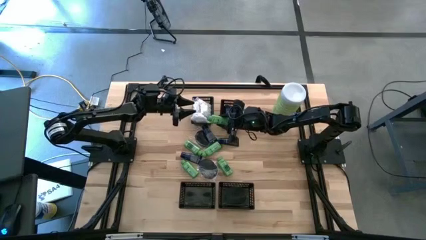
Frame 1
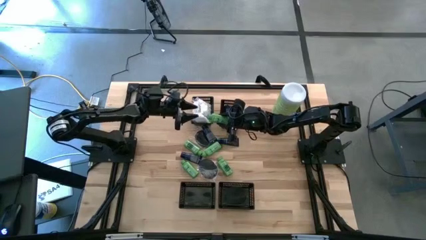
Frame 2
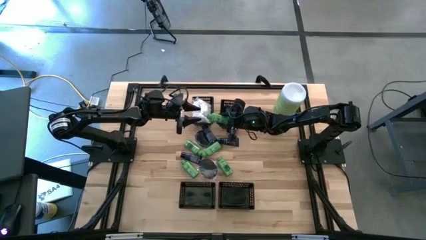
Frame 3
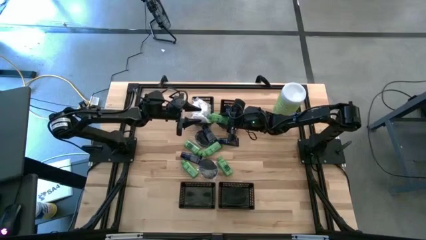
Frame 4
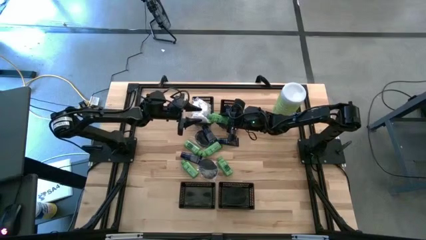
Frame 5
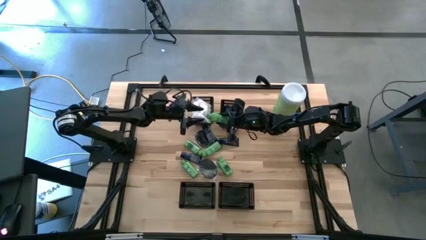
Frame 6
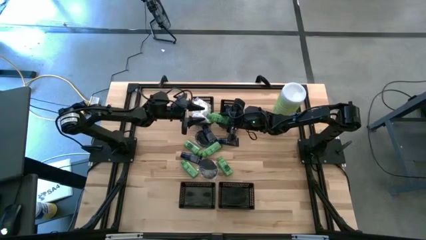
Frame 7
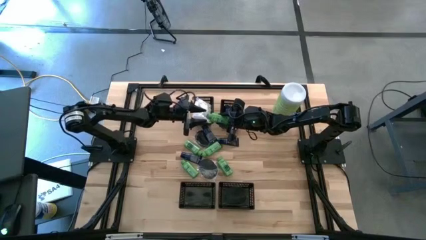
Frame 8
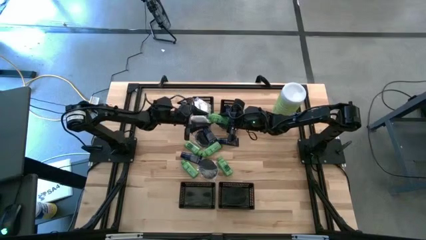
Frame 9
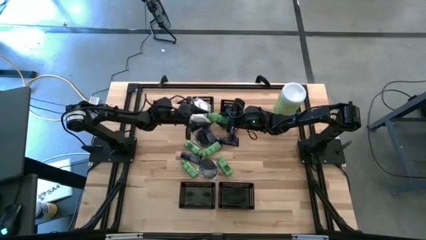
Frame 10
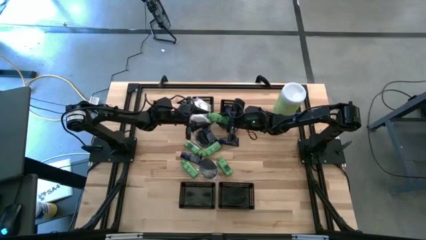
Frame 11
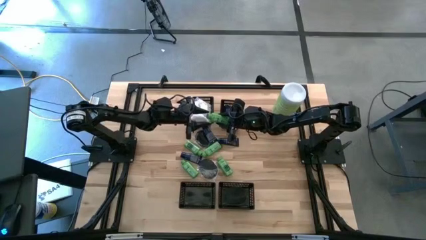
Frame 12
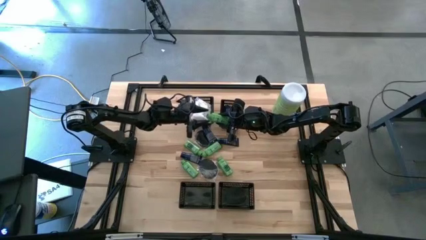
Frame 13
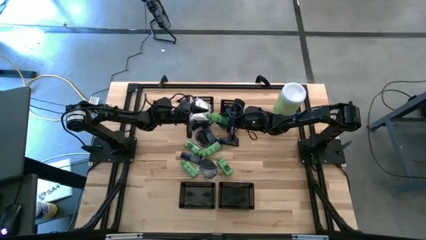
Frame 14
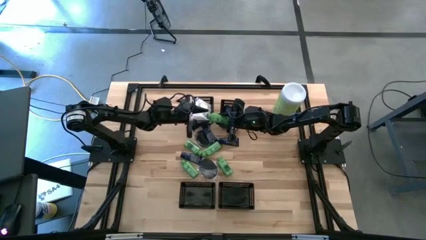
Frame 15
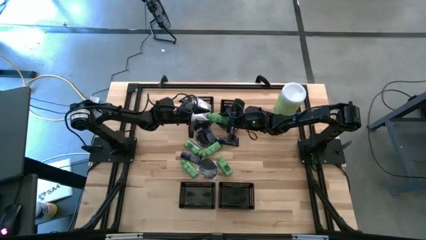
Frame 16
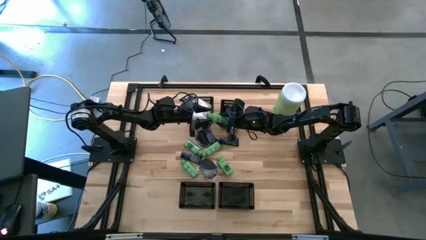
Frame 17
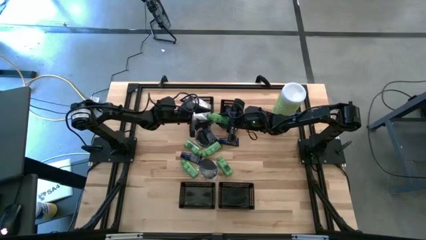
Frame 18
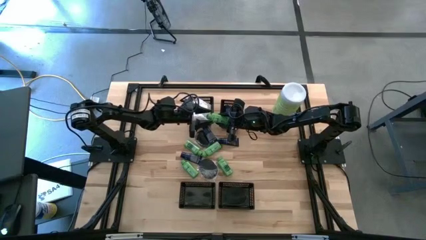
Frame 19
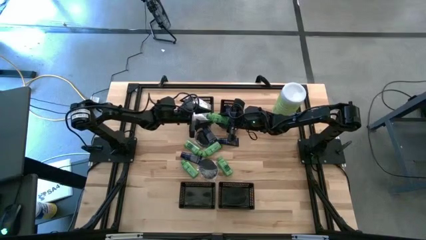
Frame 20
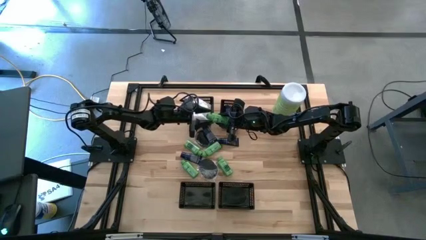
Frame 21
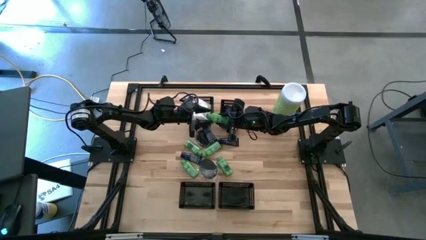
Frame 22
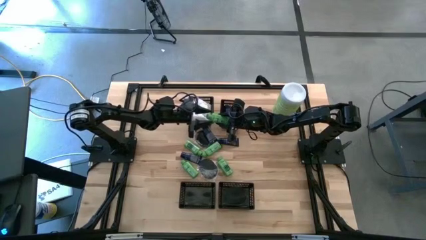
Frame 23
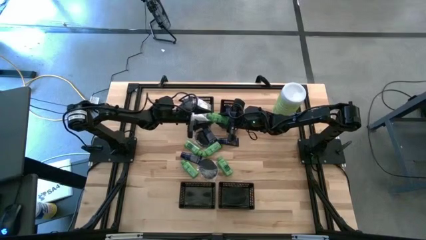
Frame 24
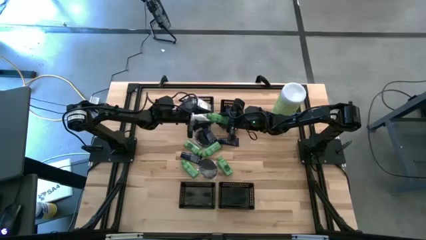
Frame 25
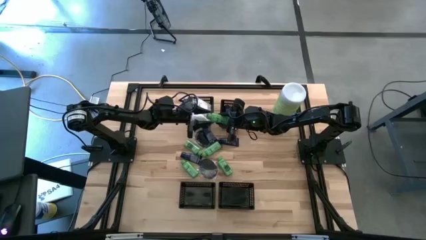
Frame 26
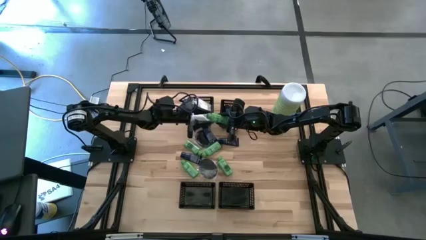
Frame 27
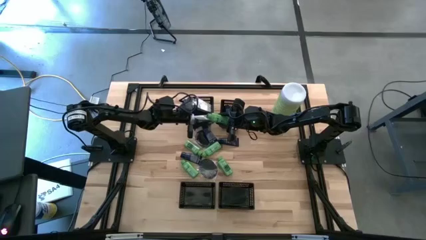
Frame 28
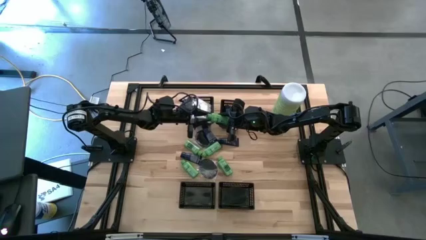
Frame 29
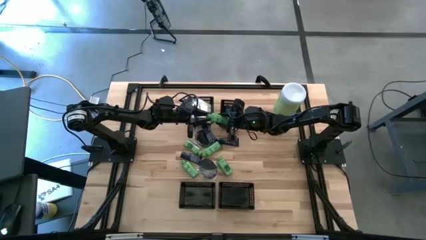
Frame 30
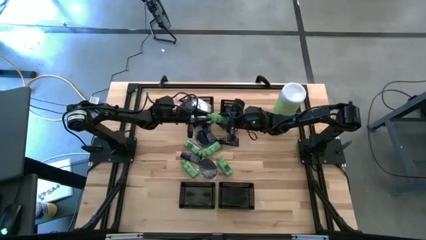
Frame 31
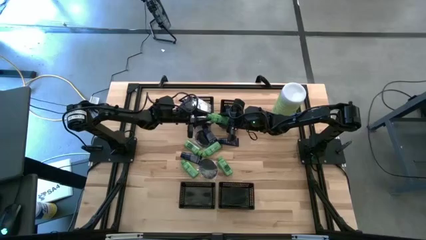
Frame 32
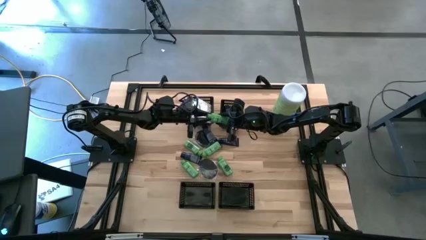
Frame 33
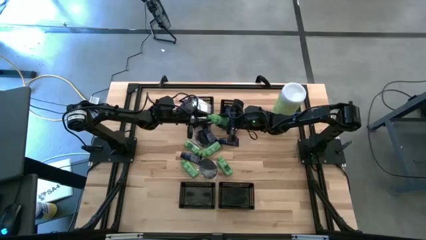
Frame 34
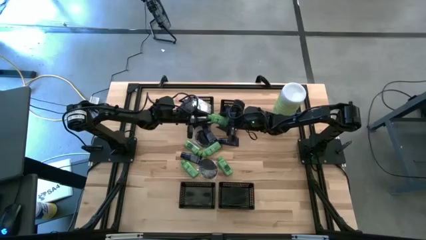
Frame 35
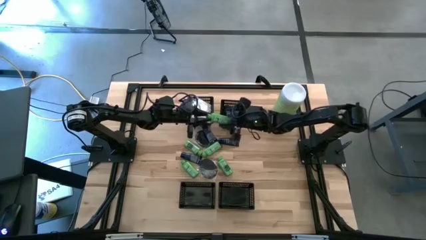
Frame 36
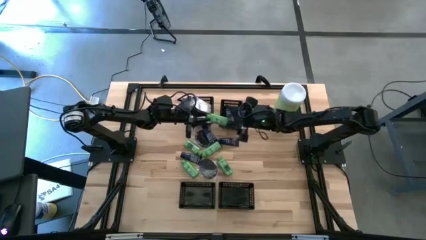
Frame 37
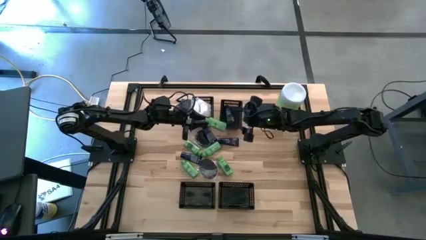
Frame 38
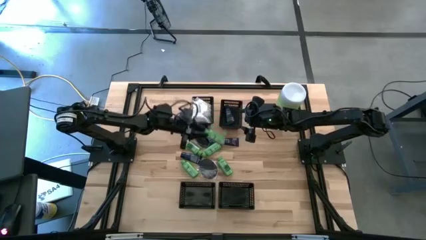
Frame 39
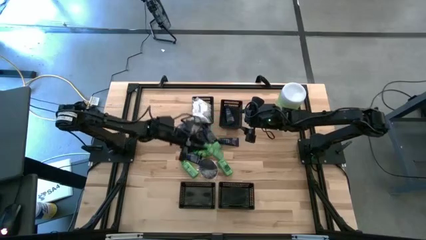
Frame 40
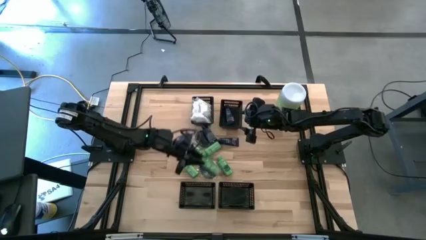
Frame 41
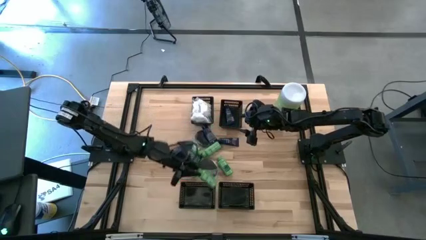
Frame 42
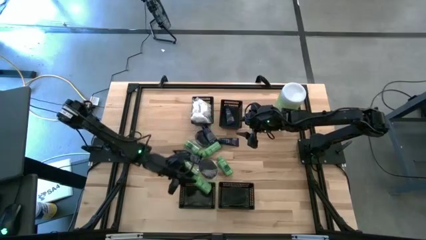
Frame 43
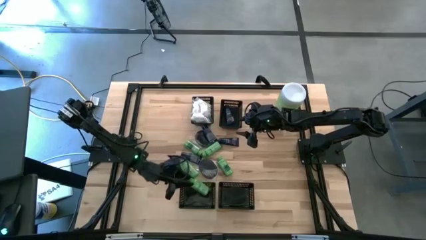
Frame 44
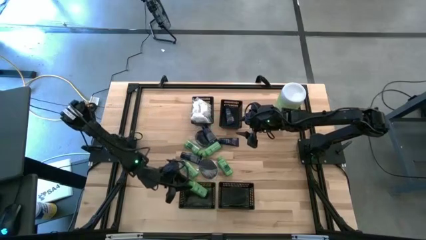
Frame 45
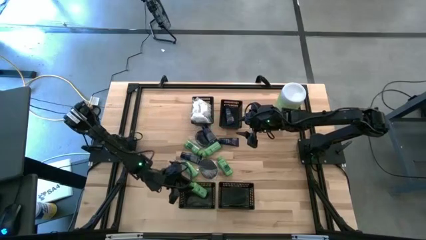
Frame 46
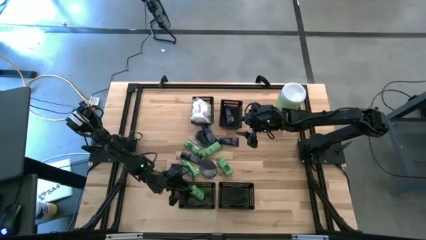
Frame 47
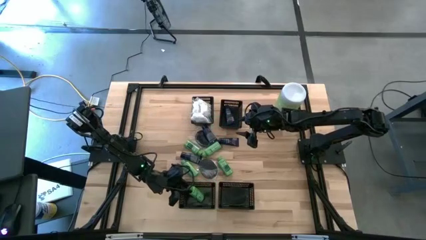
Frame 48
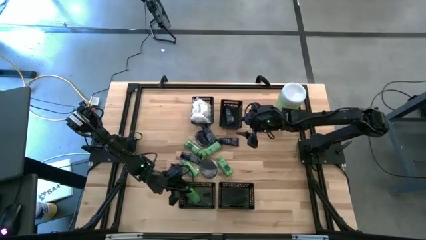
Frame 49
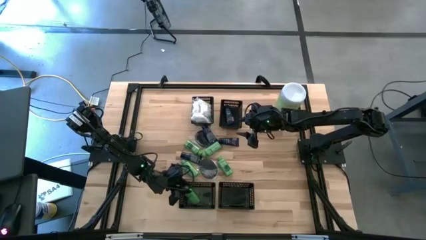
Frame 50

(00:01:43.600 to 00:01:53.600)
Task: Pick & Place Travel size toiletries
Put the green shampoo into the bottom left black bin

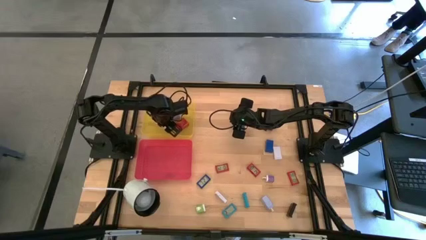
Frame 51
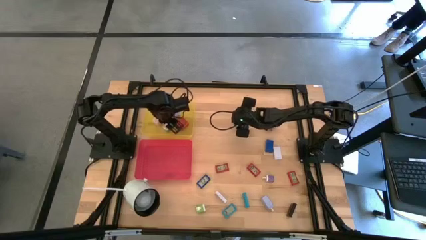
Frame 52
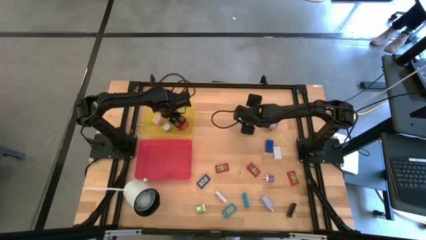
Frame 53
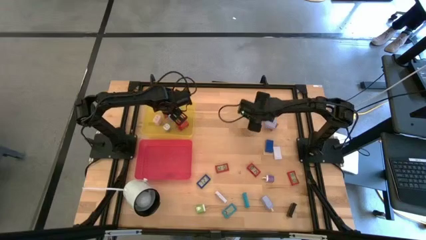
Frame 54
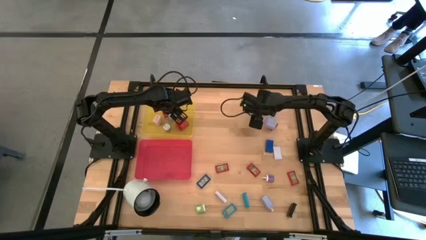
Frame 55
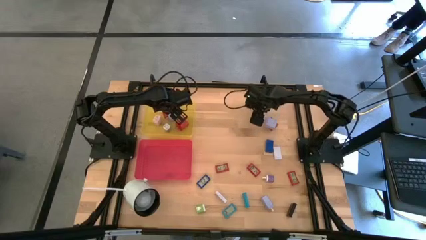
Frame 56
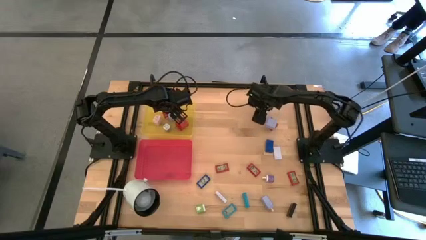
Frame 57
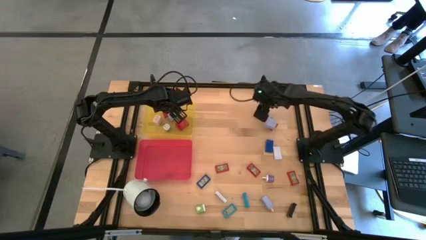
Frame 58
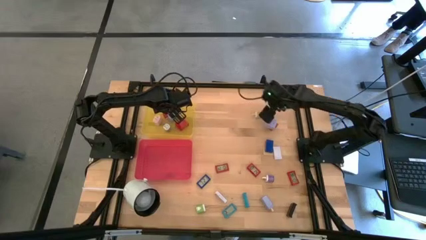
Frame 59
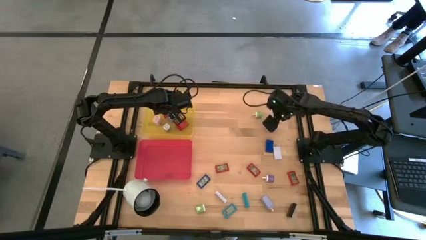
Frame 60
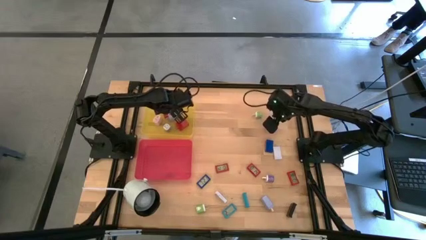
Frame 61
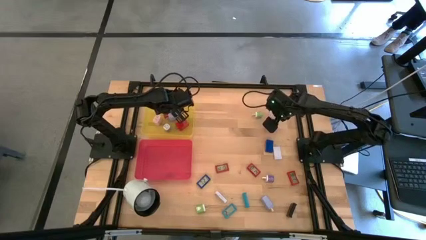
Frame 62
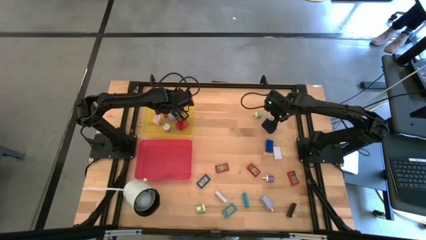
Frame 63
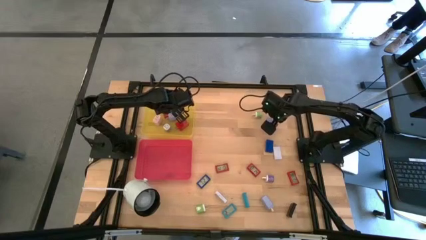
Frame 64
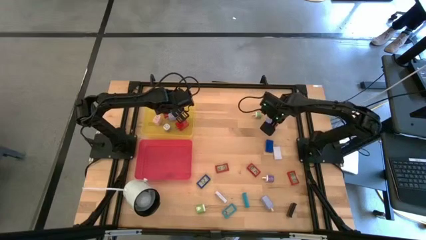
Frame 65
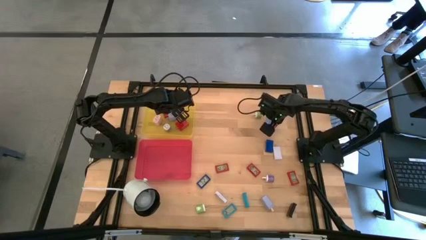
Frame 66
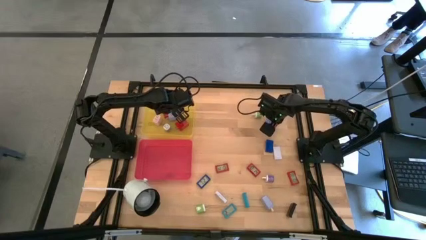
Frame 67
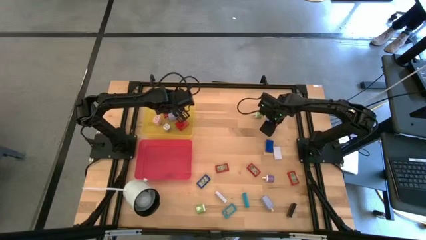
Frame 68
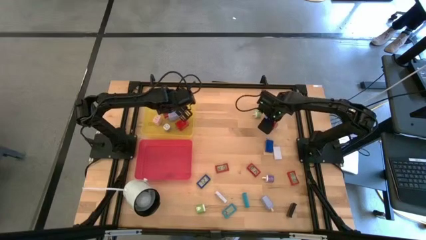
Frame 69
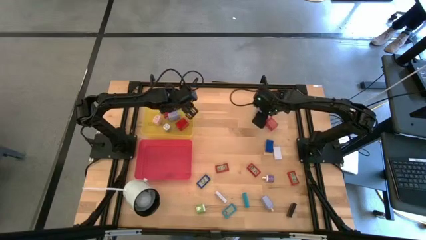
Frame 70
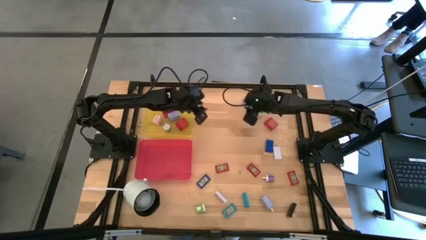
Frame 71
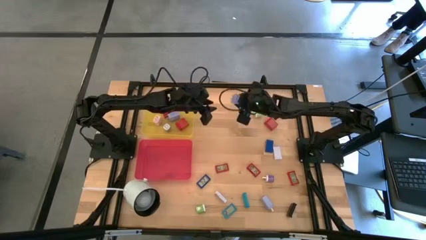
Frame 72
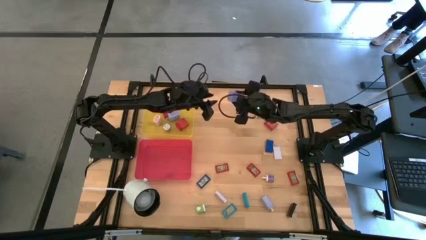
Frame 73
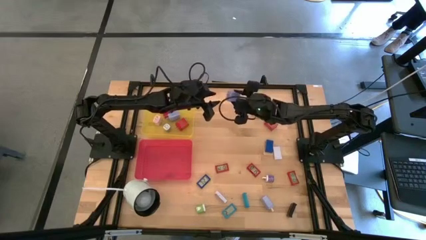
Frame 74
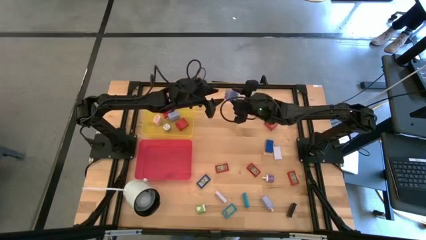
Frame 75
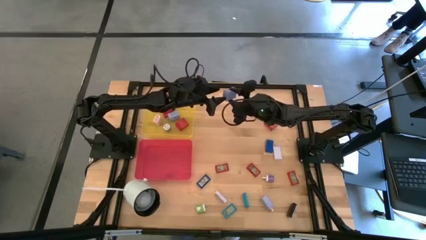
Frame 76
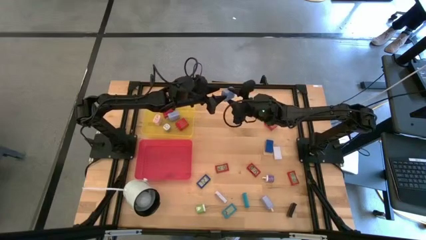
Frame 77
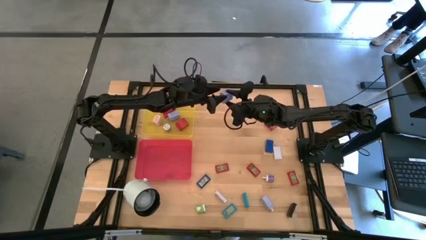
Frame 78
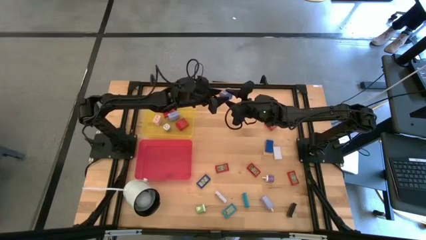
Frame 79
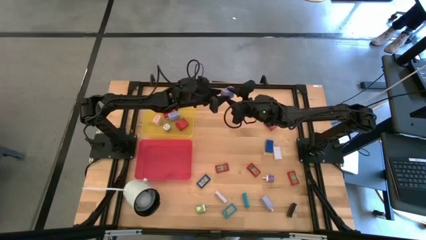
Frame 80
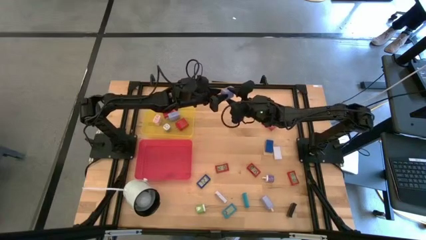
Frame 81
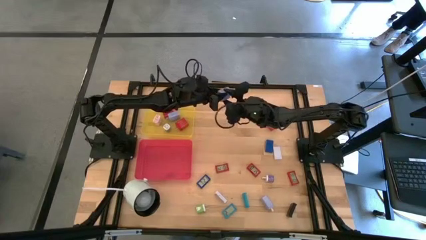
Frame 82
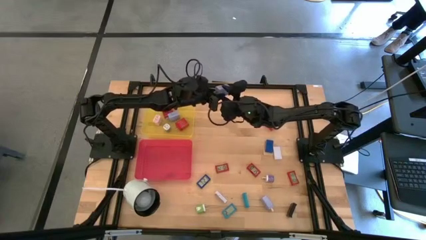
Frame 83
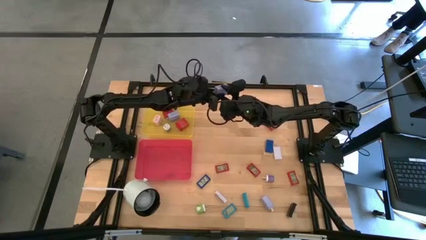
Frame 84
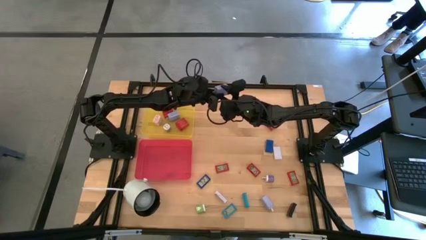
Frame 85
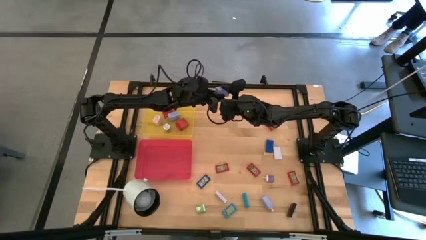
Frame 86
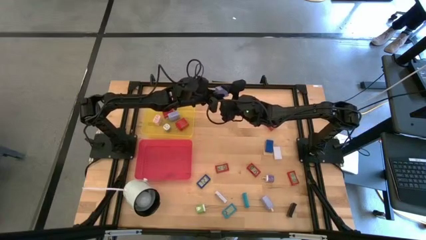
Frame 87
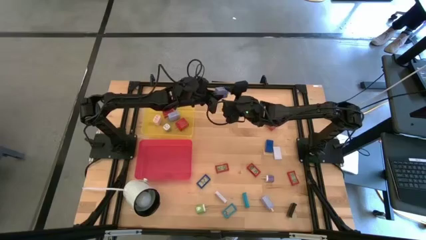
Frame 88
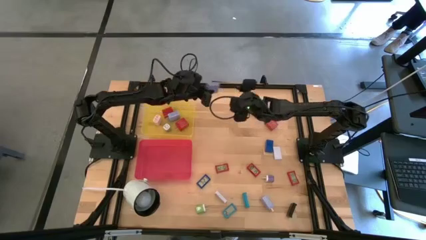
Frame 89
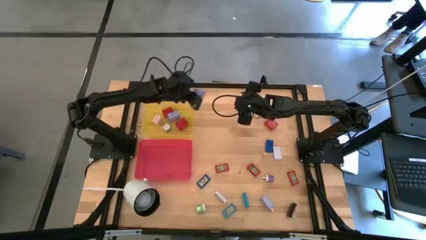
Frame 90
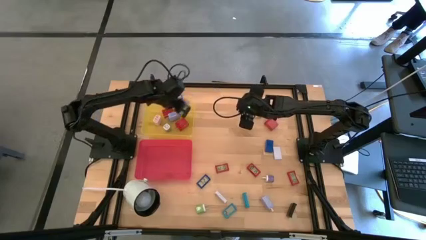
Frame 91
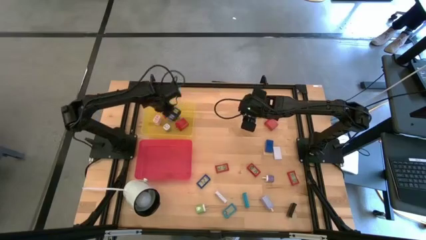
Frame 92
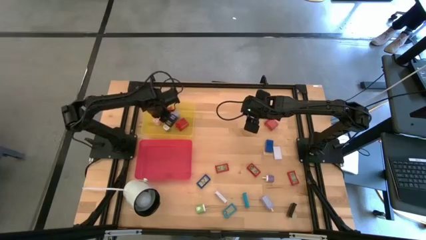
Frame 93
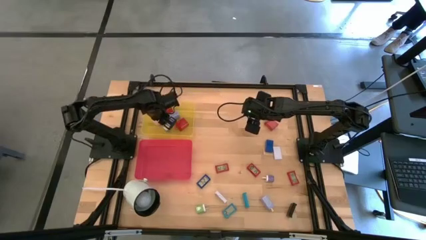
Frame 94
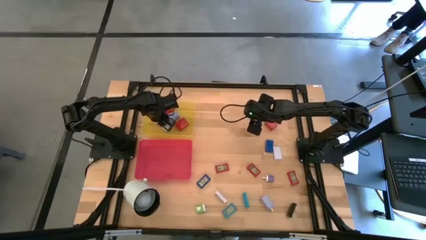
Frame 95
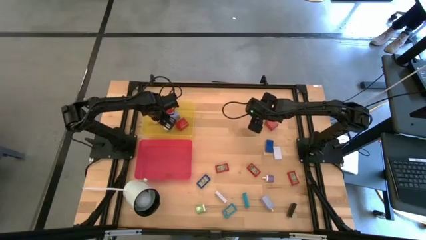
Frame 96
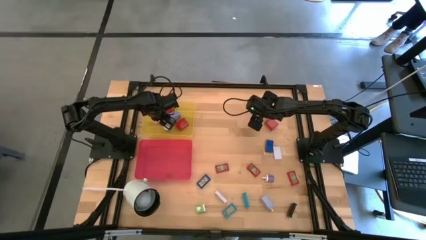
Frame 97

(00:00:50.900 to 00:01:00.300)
Task: Pick & Place Office items
Put the blue charger adapter into the yellow bin
